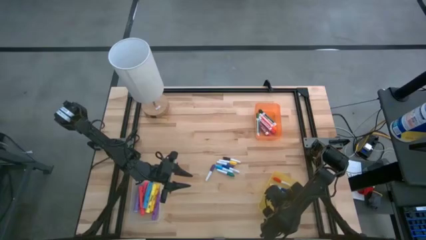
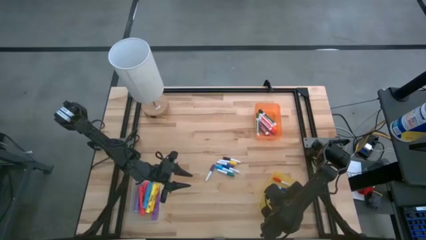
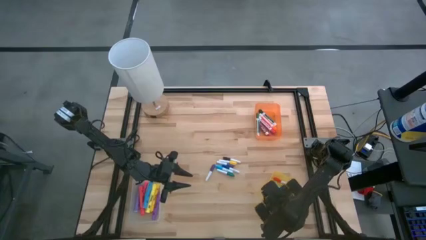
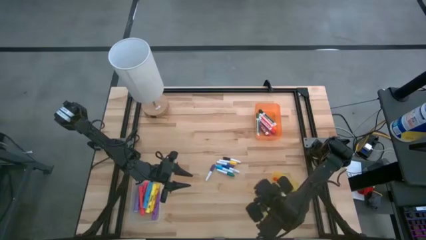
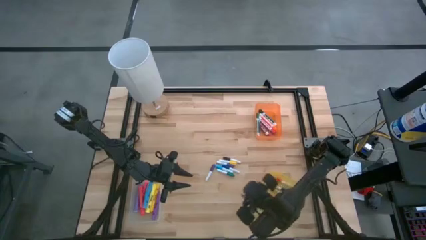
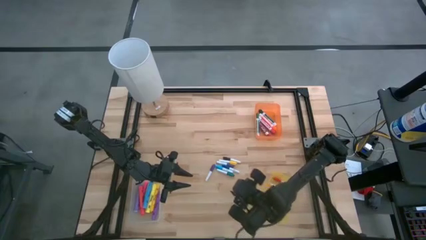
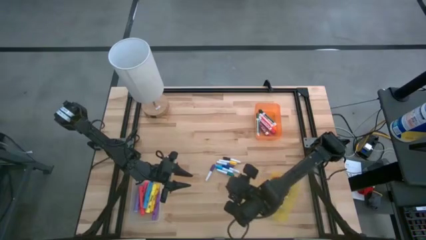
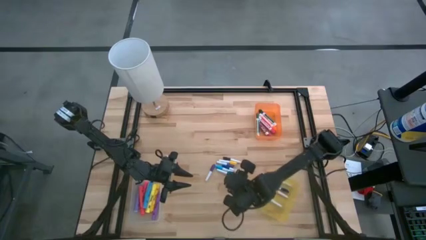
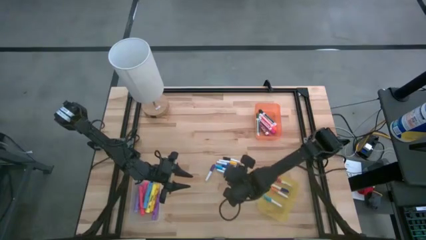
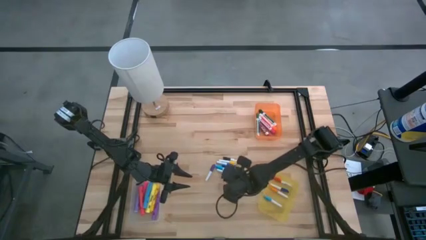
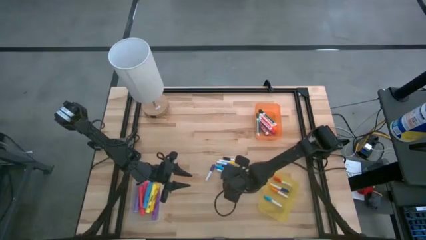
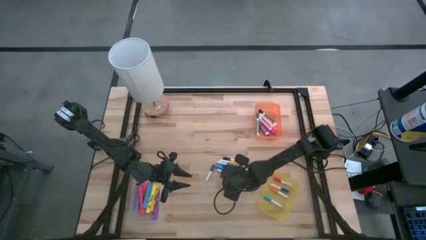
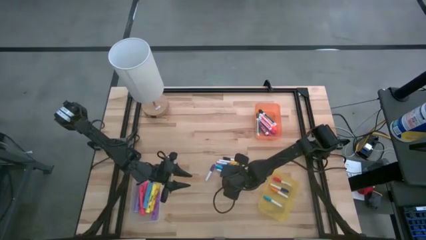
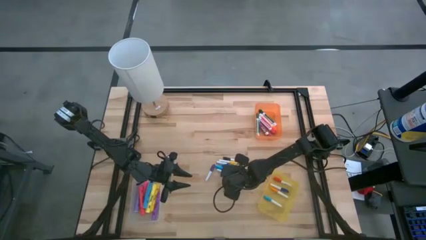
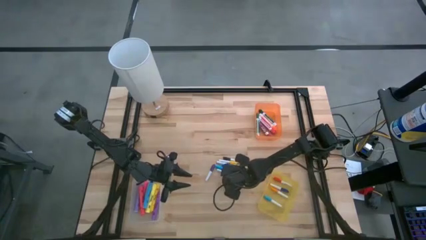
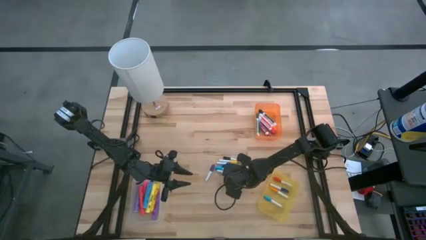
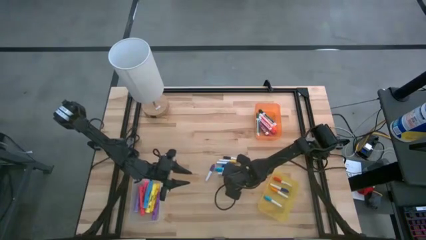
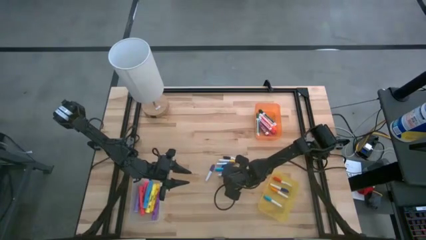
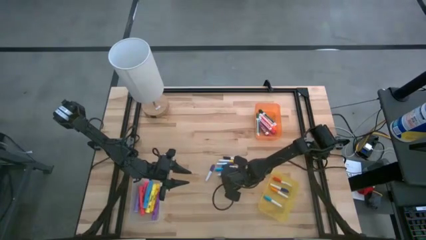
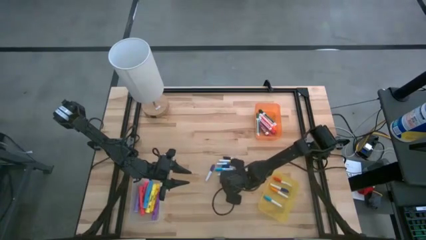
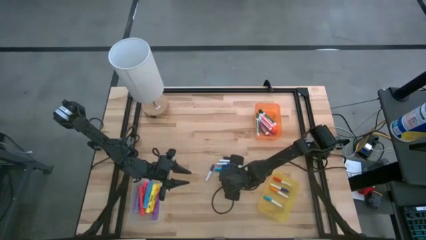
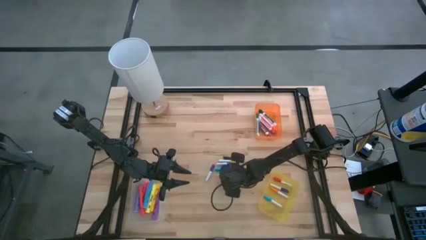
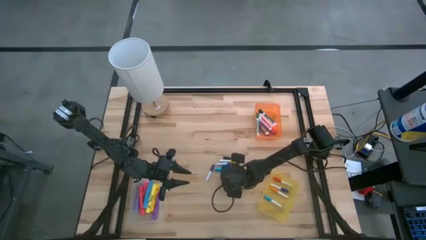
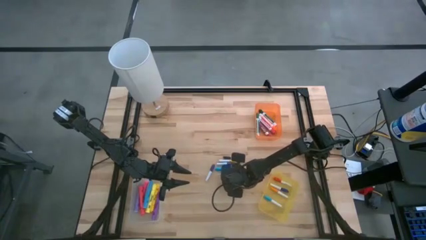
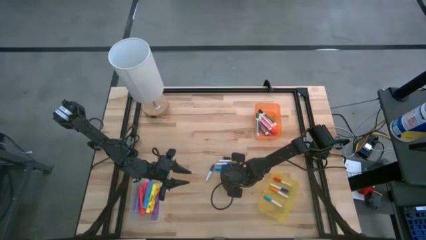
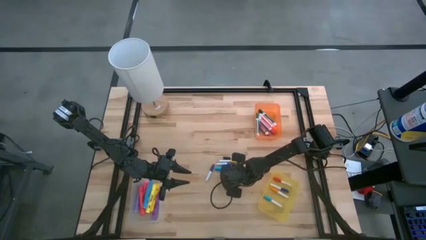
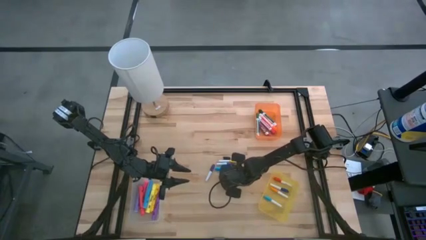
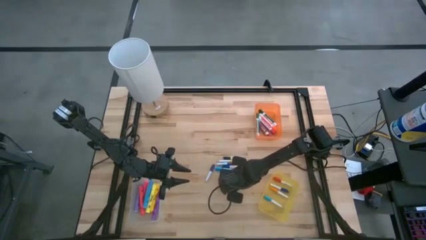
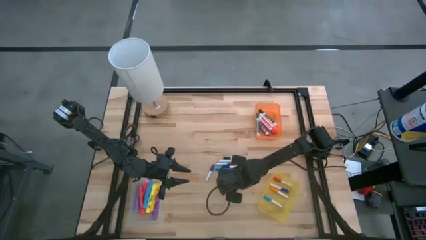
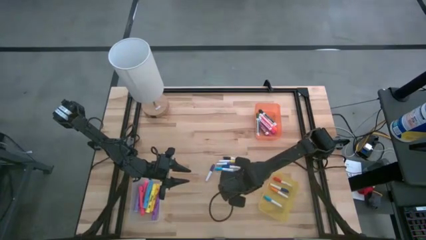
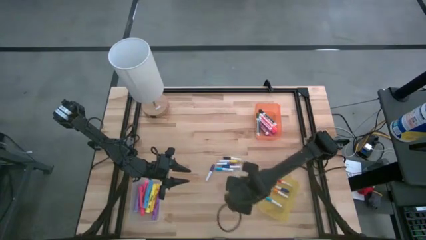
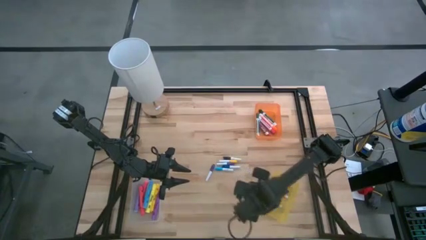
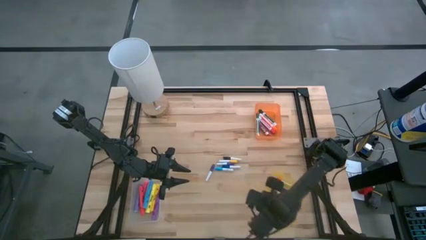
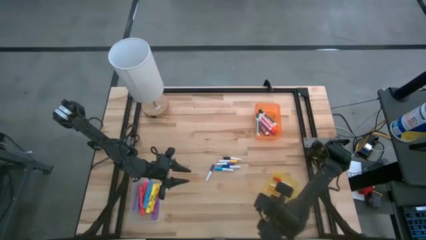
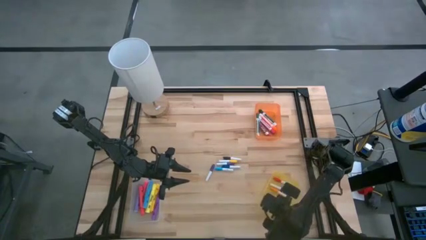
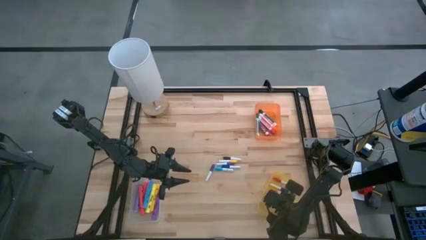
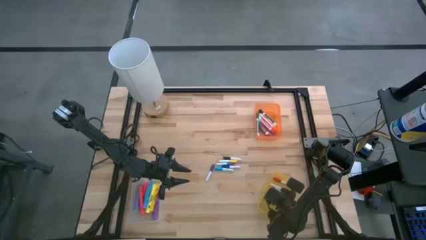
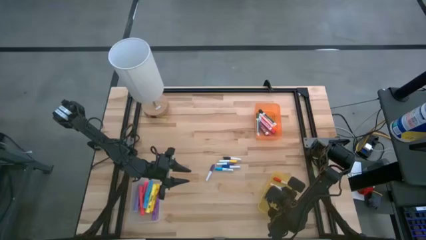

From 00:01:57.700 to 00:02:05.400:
Task: Pick & Place Markers
Put the green highlighter pen into the yellow bin

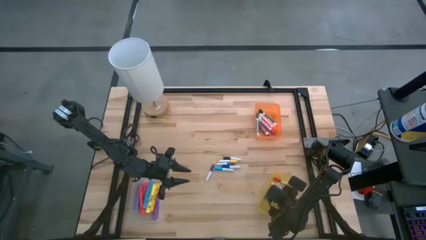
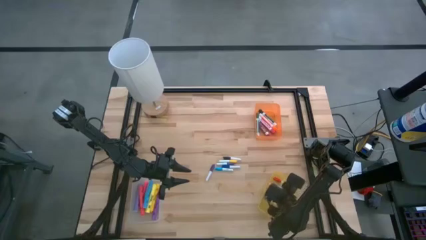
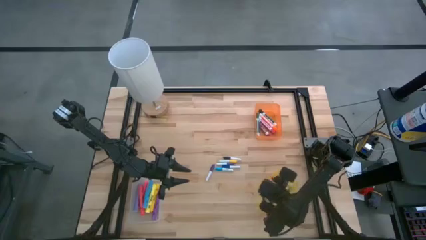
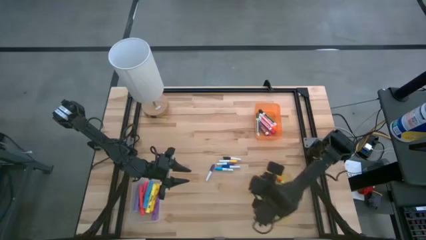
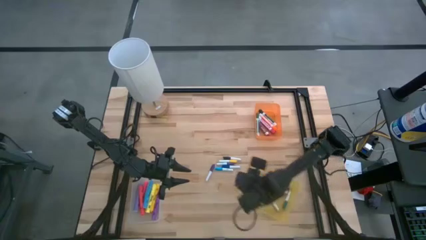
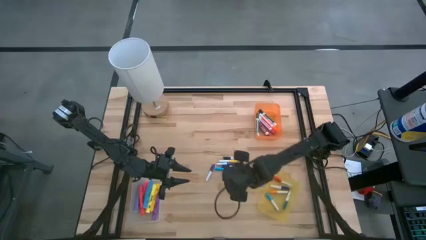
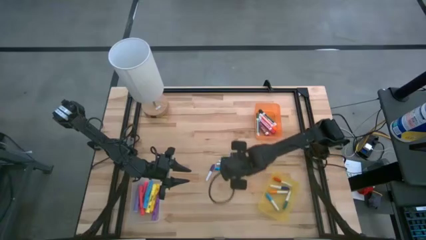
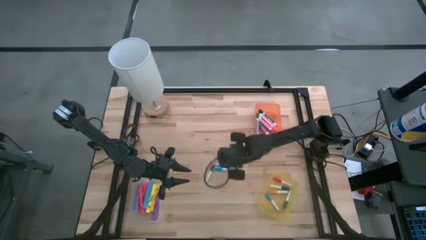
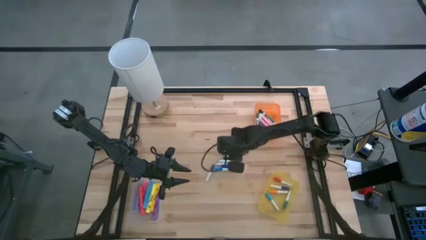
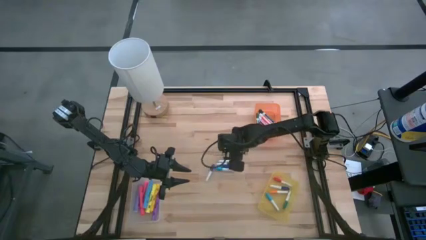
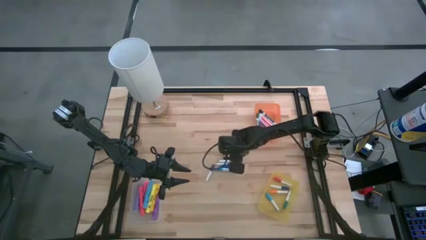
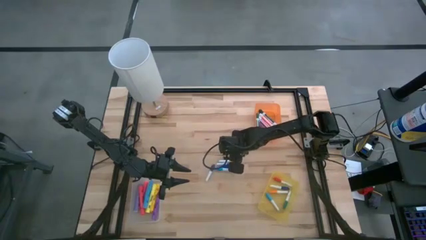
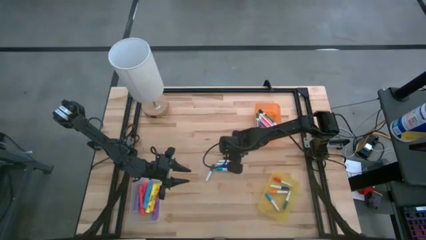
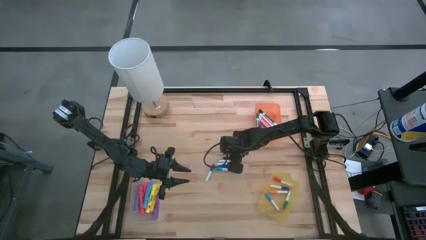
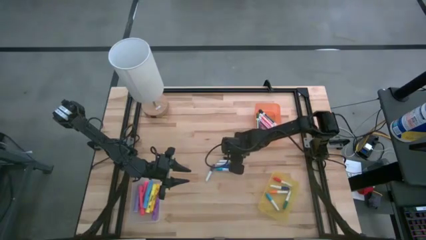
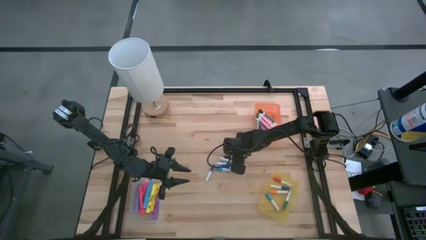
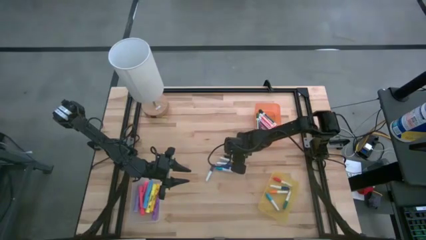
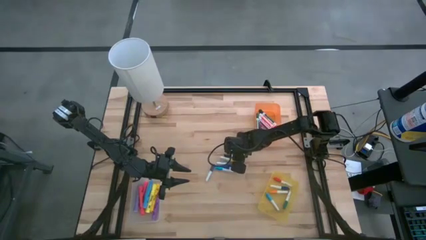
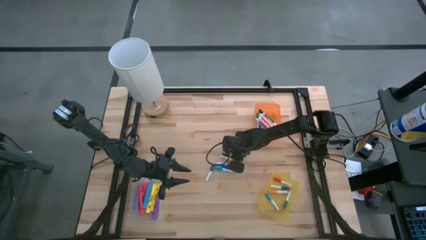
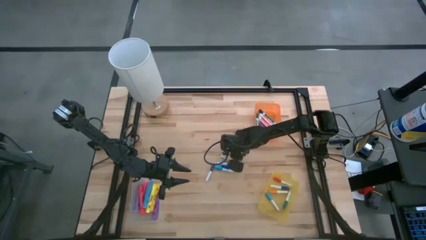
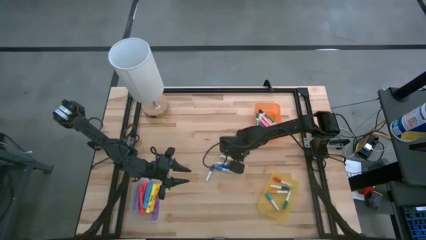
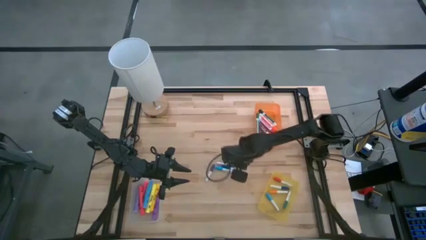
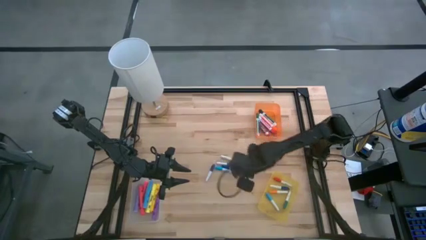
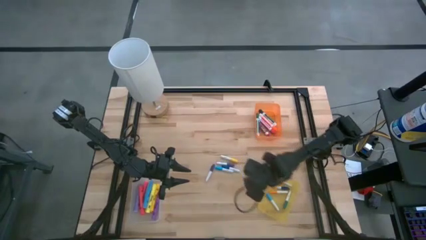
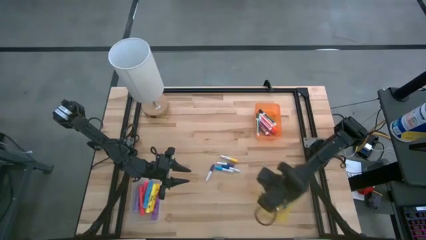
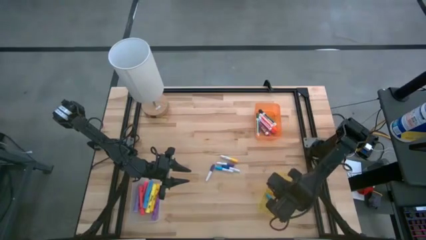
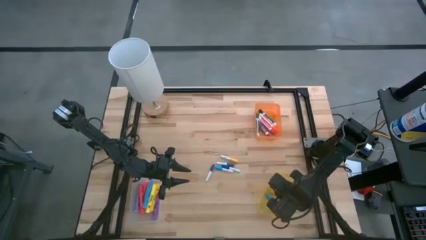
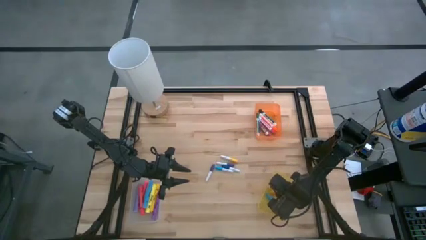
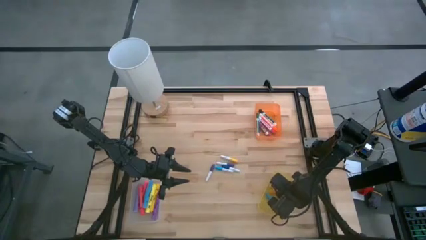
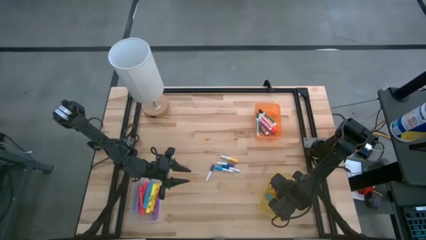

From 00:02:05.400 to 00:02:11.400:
Put the black highlighter pen into the yellow bin

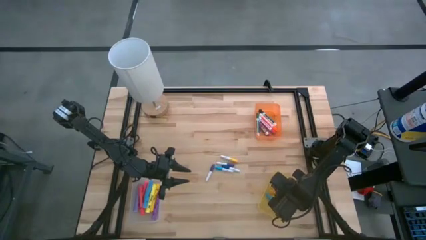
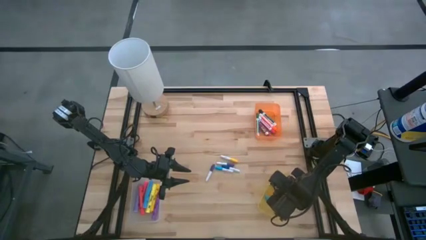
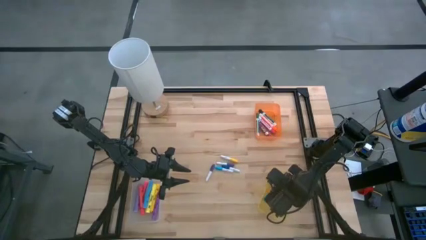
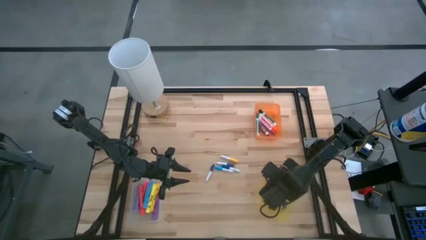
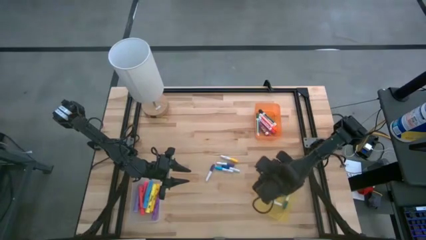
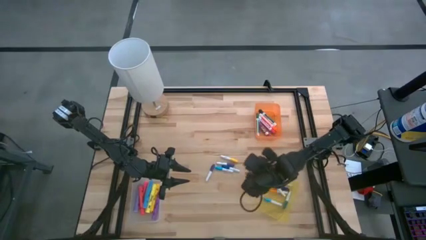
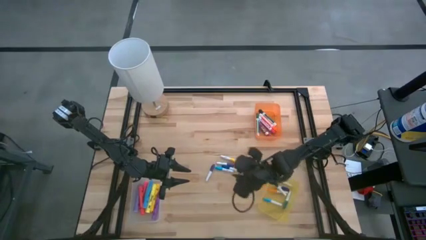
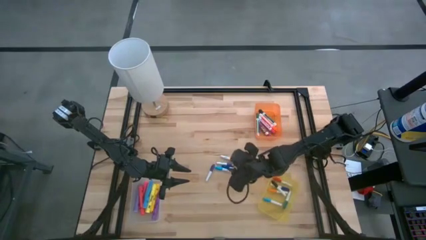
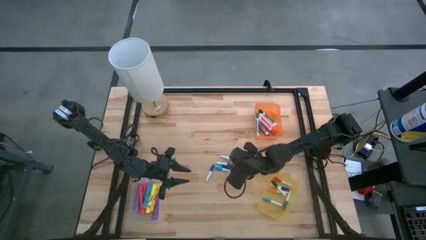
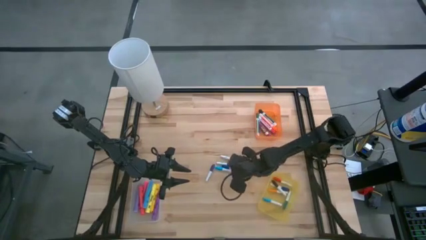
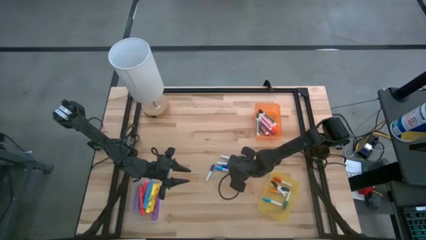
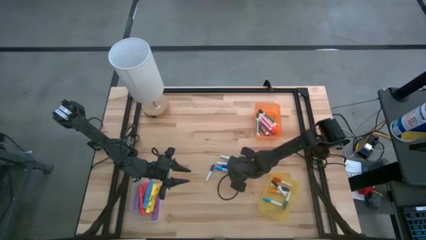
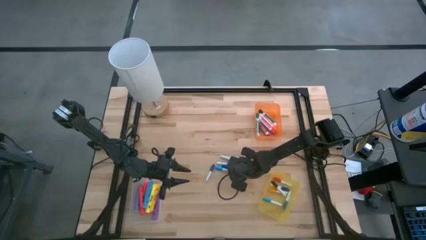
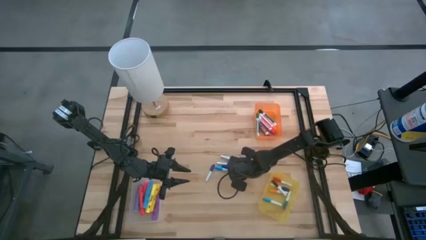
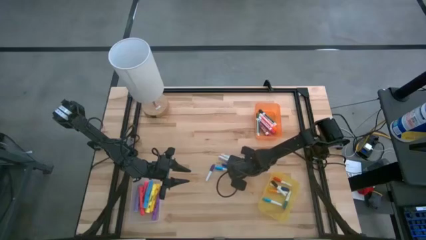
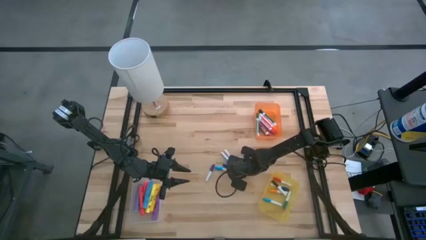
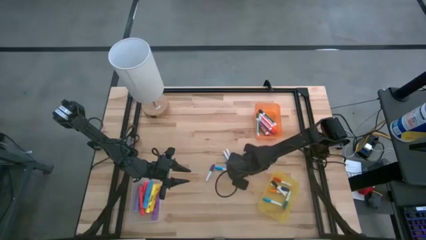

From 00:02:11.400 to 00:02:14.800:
Put the blue highlighter pen into the yellow bin
